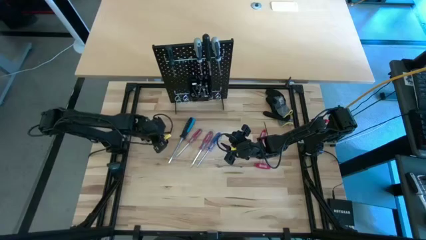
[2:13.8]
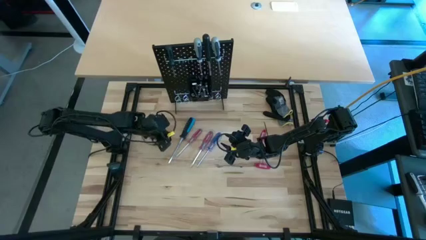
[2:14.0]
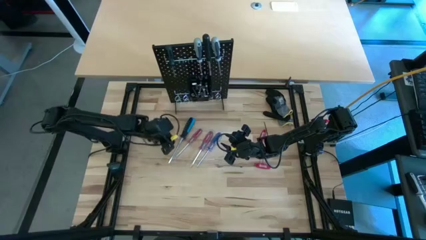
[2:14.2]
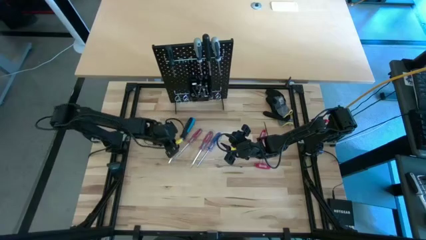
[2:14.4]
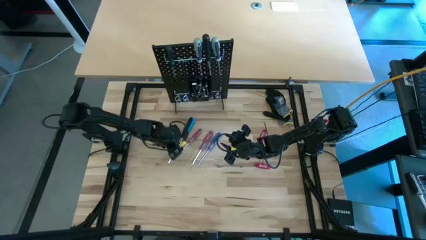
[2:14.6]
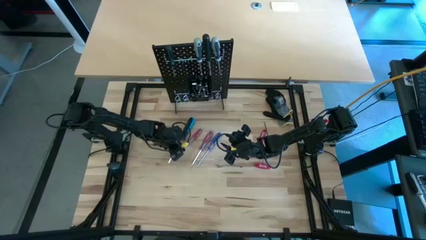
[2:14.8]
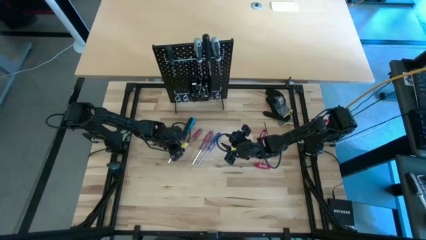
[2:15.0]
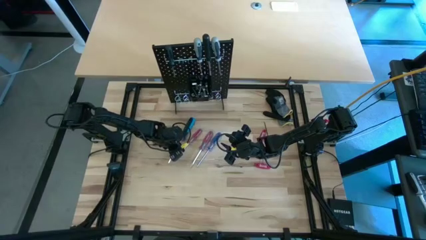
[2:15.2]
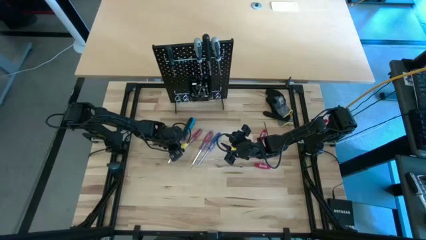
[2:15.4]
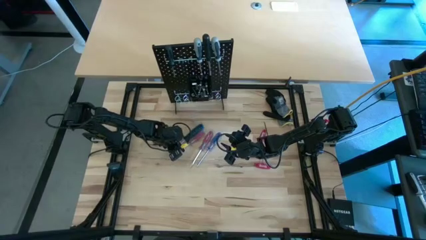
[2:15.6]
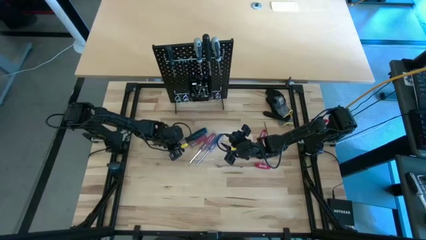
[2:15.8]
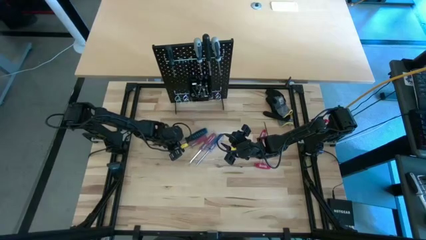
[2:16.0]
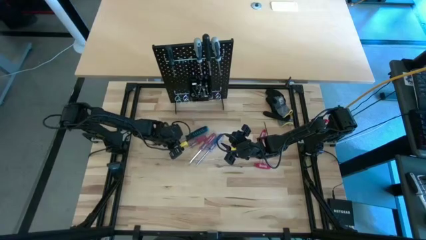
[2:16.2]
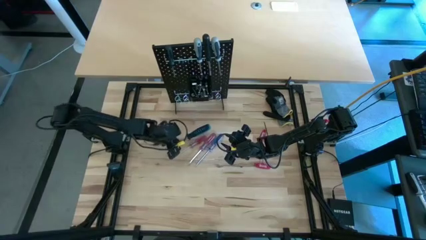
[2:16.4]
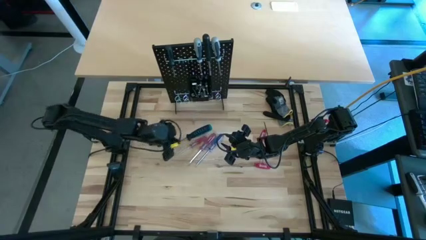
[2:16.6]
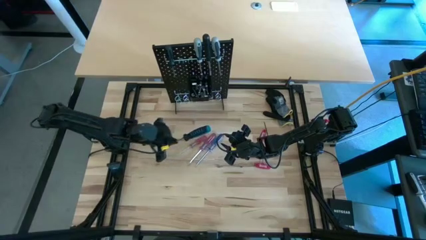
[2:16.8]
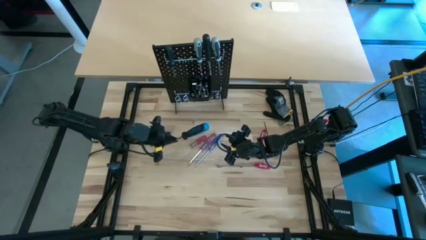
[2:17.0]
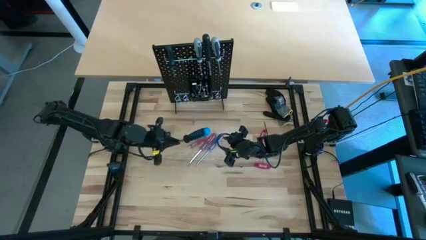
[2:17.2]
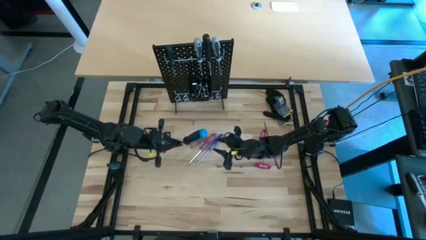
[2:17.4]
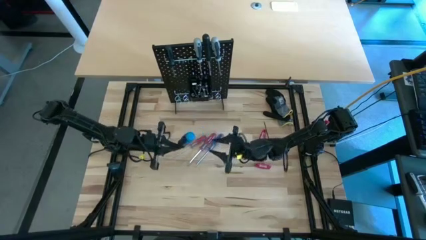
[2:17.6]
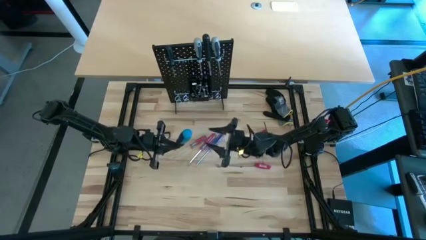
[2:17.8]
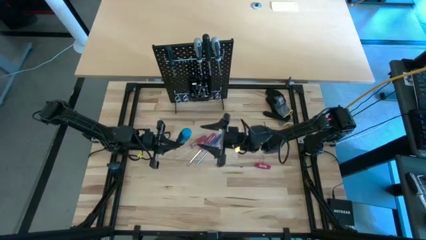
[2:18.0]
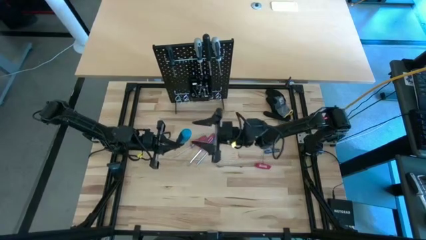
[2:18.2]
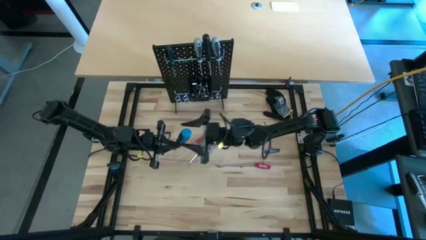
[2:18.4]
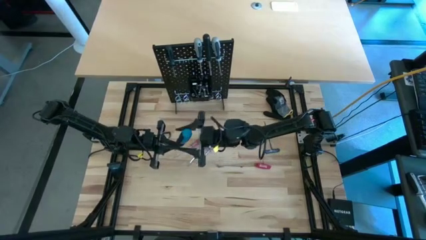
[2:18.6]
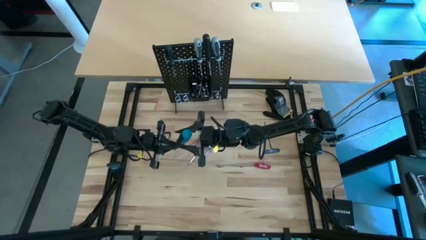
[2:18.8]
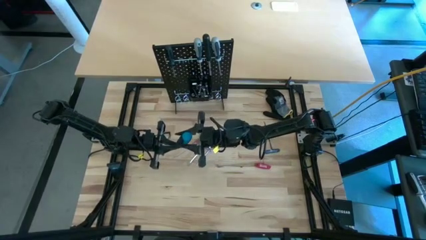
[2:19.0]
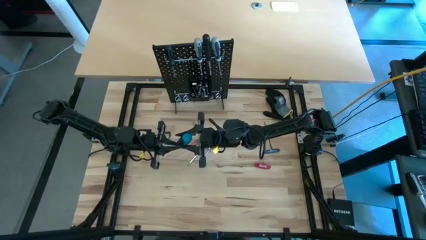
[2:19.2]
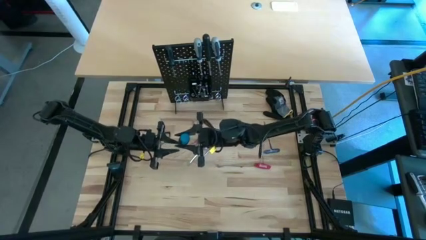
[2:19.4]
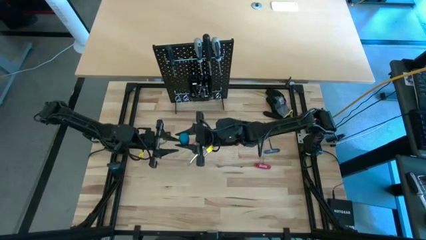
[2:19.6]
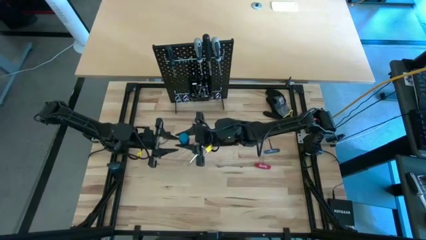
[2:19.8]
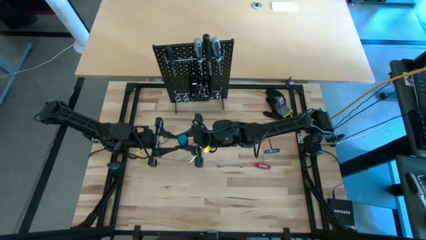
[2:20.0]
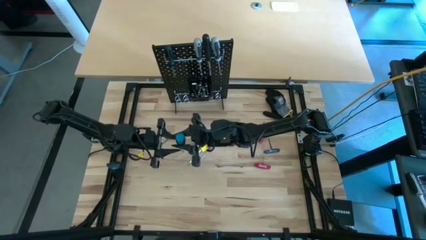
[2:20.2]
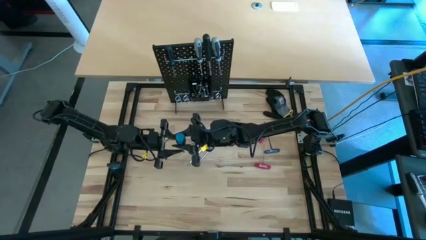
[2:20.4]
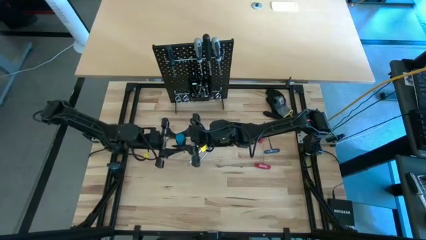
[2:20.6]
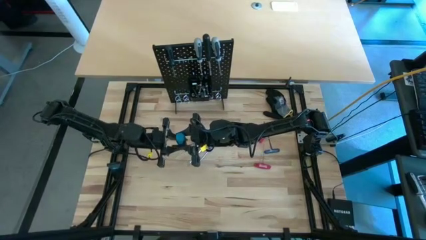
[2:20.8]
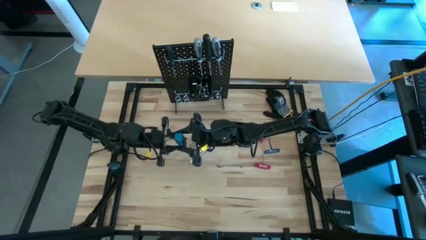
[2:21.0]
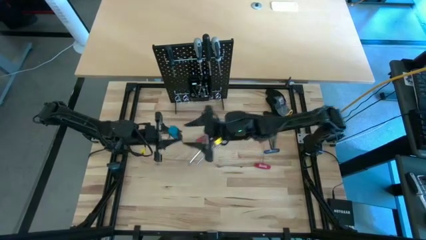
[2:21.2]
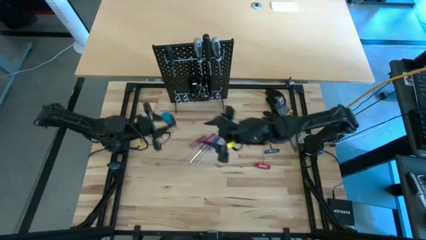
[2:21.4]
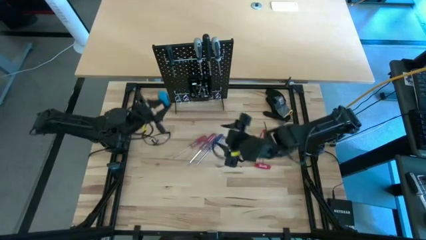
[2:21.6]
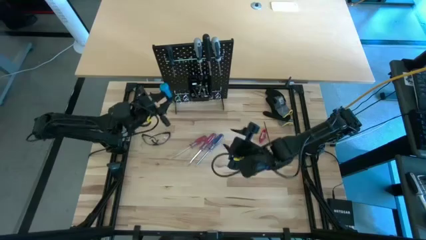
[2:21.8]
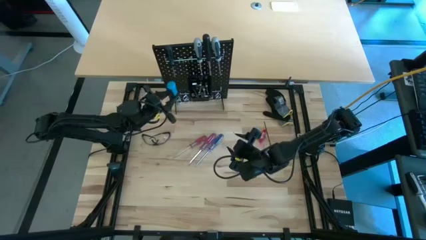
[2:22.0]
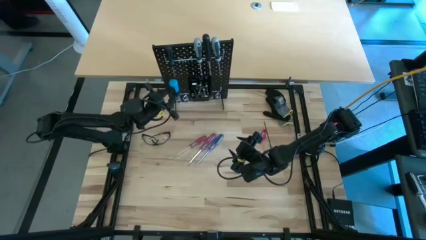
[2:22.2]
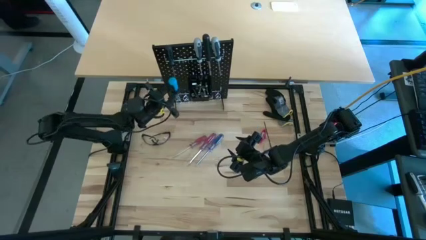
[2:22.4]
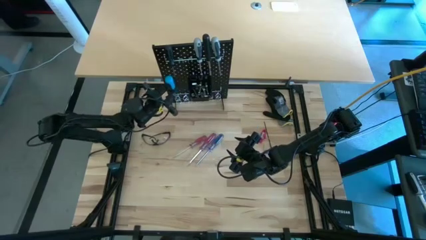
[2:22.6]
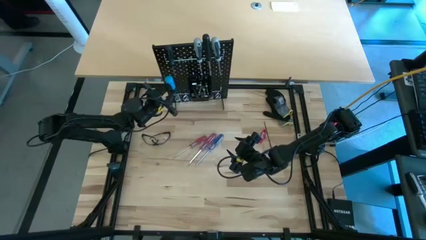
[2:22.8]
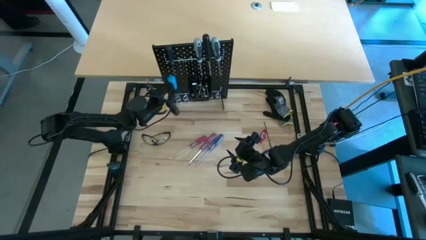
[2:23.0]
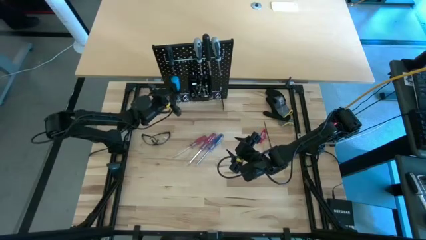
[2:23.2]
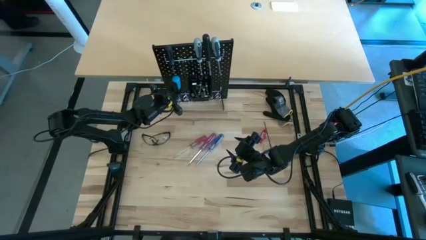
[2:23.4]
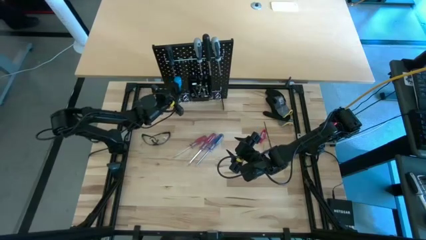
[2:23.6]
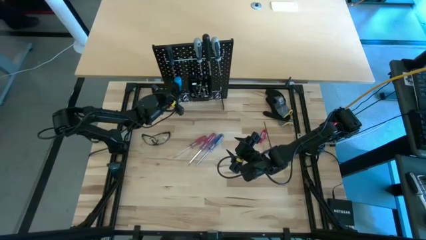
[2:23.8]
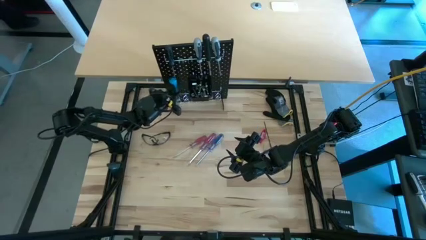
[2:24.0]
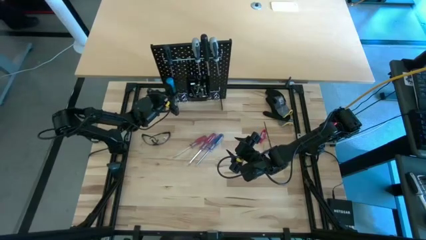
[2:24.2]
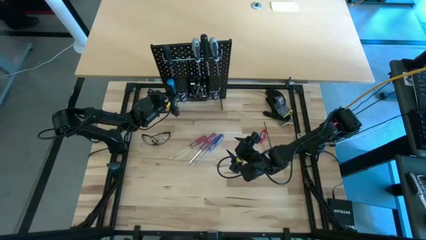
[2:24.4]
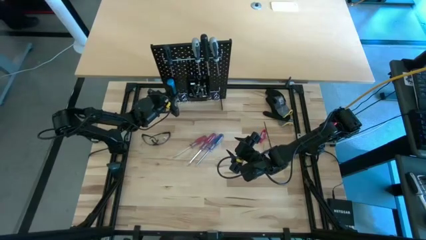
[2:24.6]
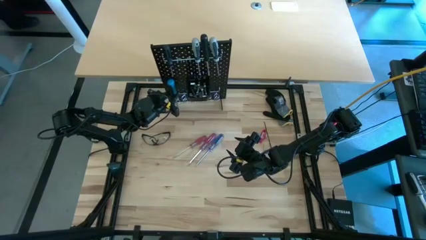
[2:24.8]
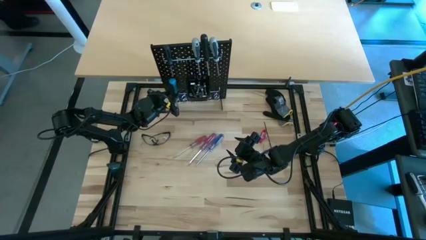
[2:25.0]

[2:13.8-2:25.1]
Task: Hang tools onto peg board
Hang the black and blue screwdriver on the peg board

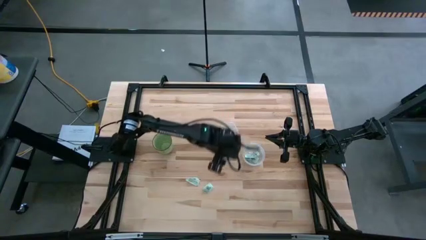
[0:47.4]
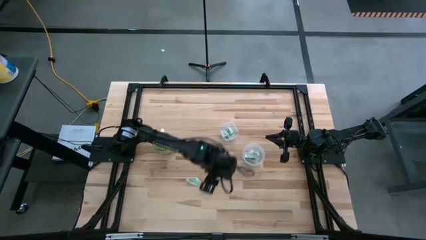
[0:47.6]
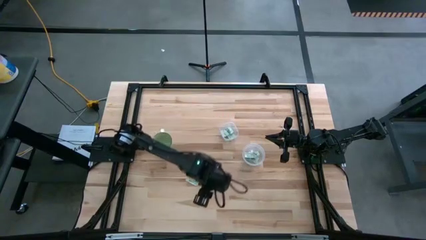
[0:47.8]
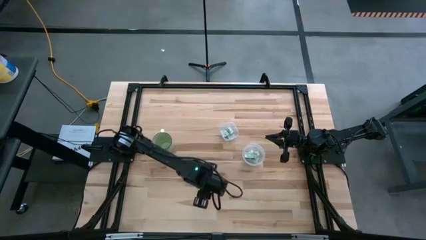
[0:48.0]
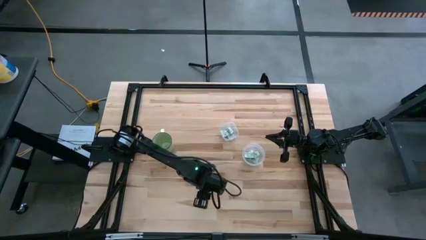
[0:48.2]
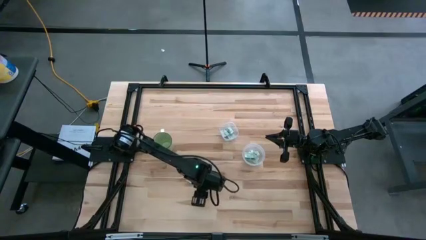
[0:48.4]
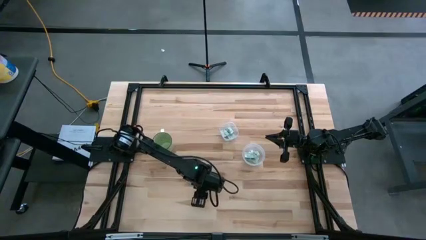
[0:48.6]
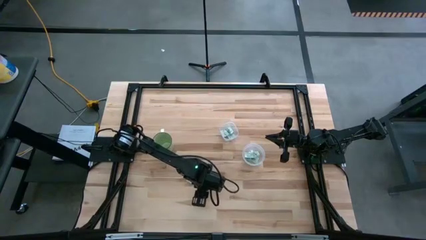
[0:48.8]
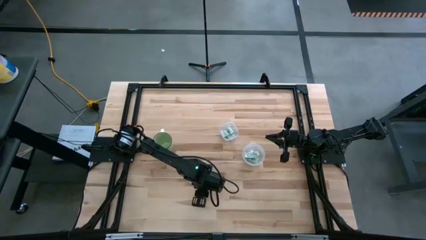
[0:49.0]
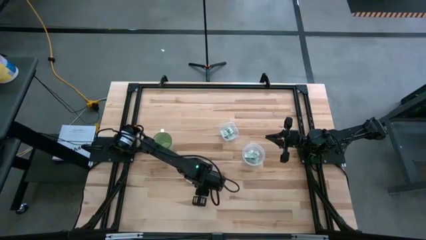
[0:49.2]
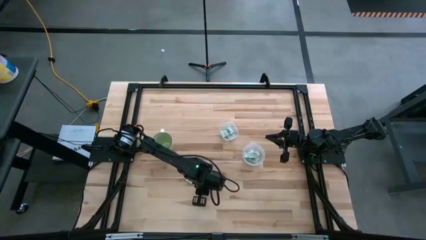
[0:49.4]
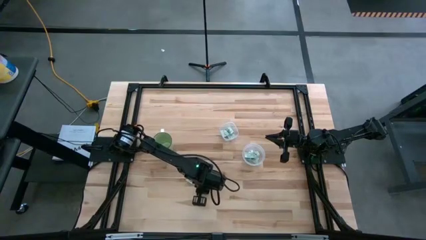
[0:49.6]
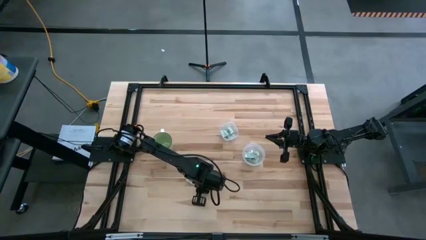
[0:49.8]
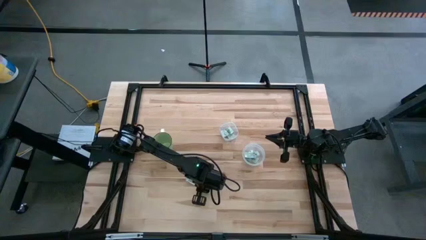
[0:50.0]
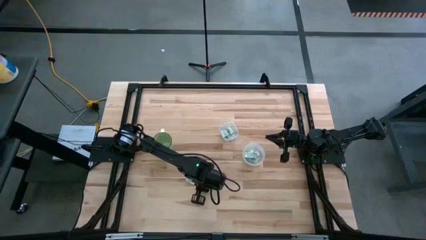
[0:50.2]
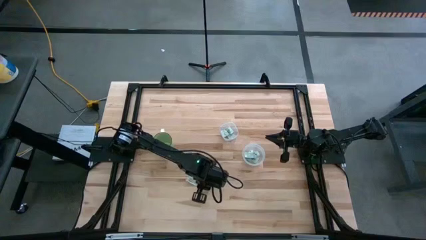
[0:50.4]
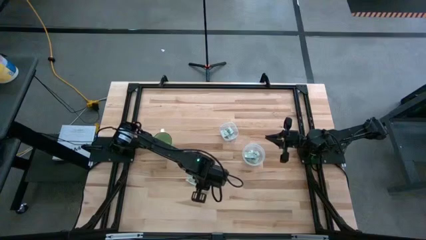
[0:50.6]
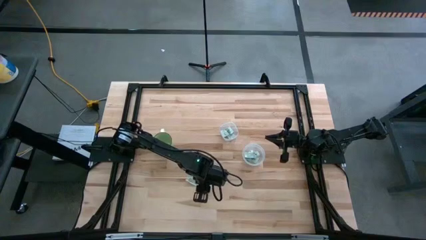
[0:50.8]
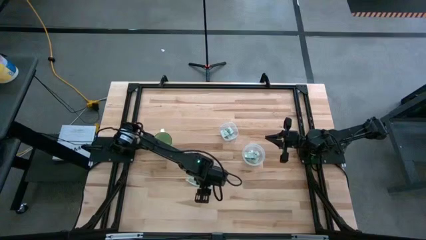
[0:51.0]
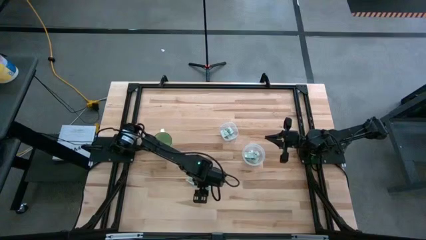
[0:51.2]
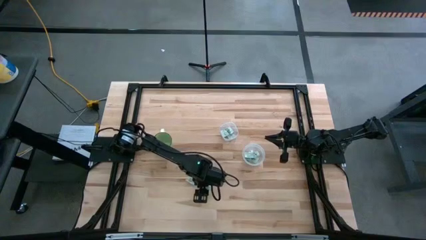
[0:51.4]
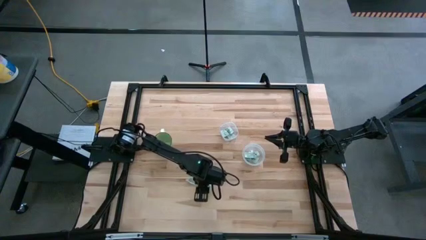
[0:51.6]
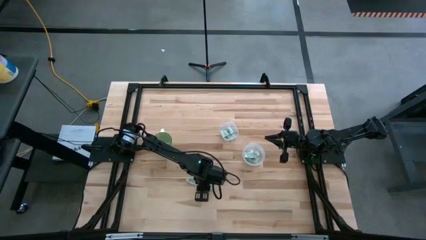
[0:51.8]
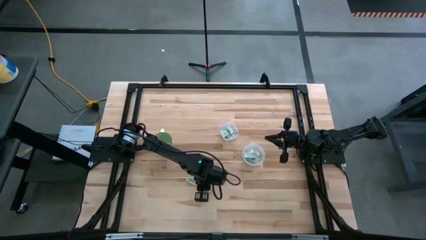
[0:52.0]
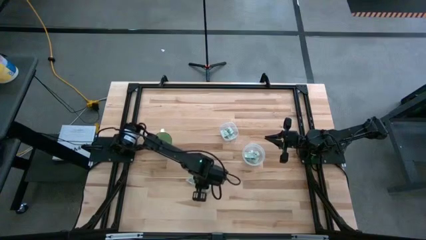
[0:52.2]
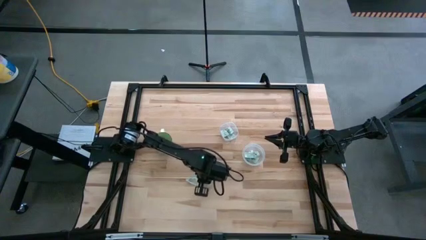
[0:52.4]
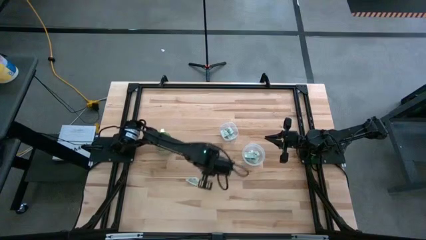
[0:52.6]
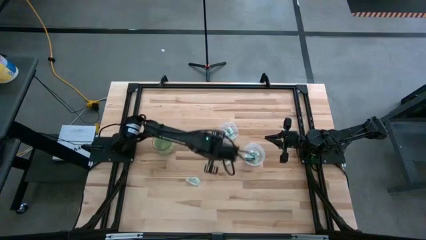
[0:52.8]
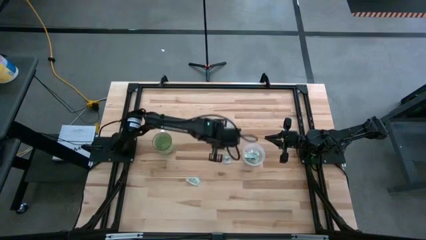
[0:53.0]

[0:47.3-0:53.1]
Task: Pick and place Stevia / Truvia into bins
Put the stevia packet into the top transparent container
